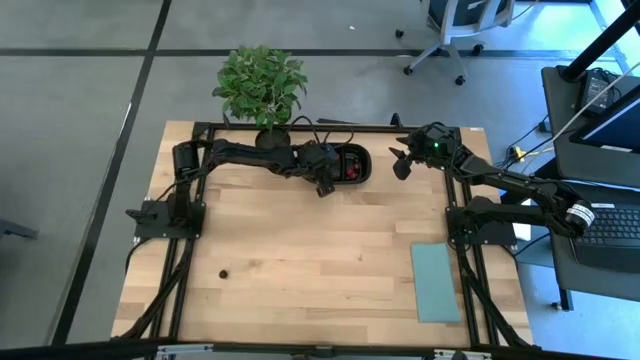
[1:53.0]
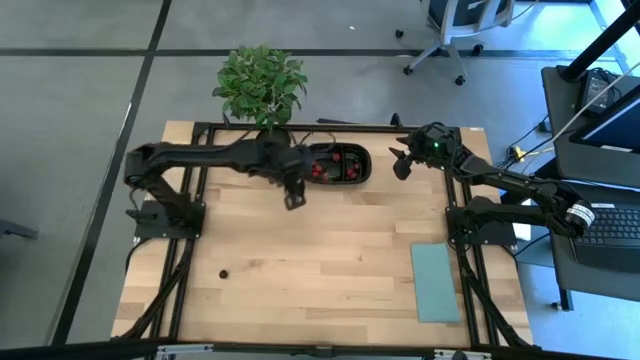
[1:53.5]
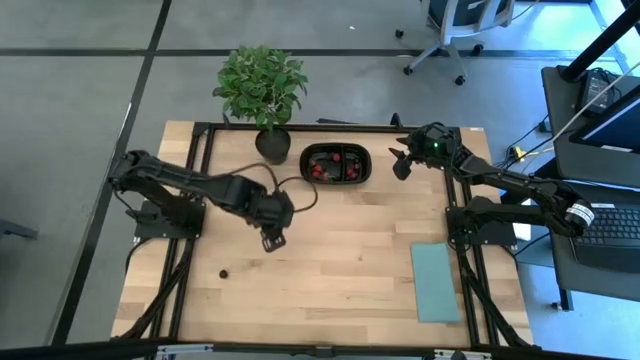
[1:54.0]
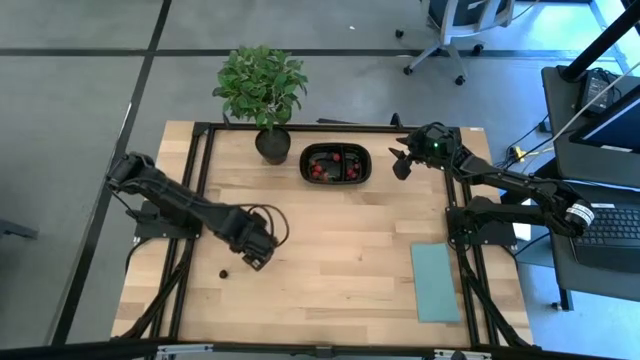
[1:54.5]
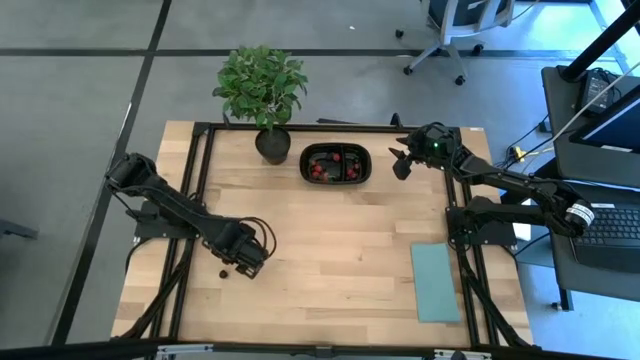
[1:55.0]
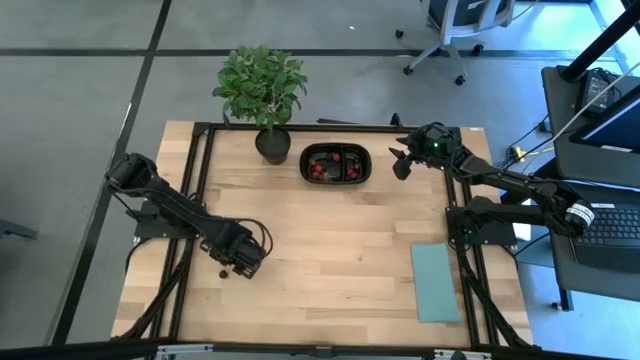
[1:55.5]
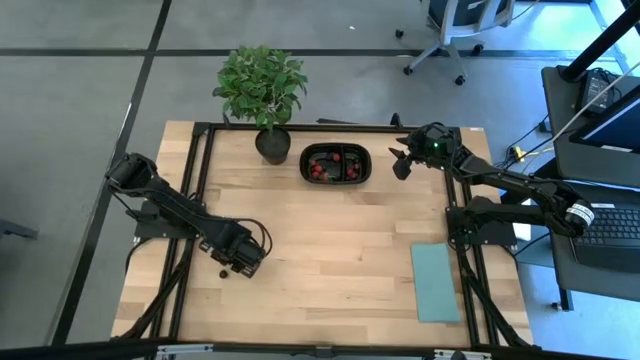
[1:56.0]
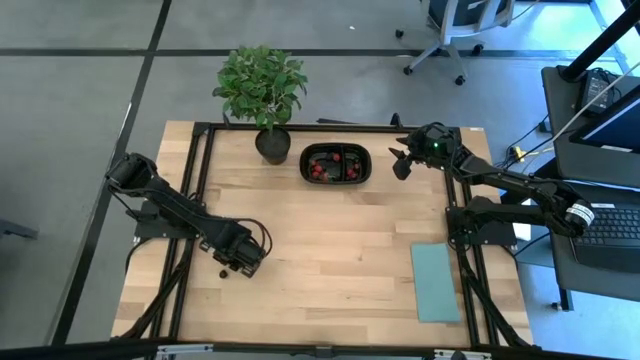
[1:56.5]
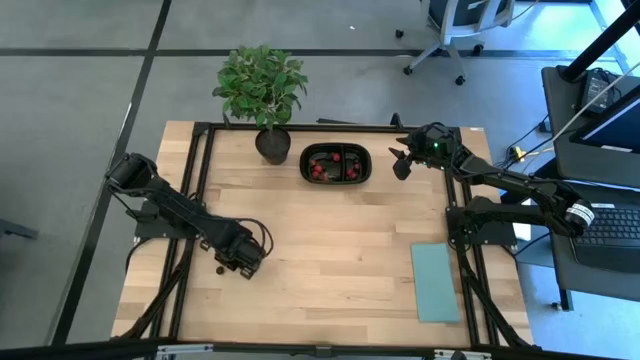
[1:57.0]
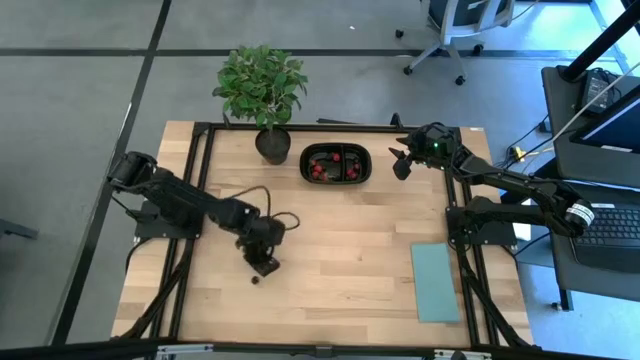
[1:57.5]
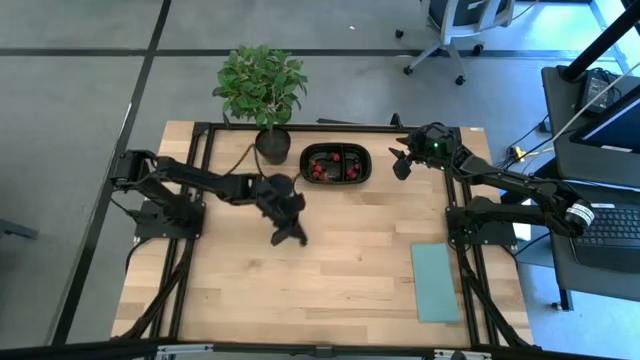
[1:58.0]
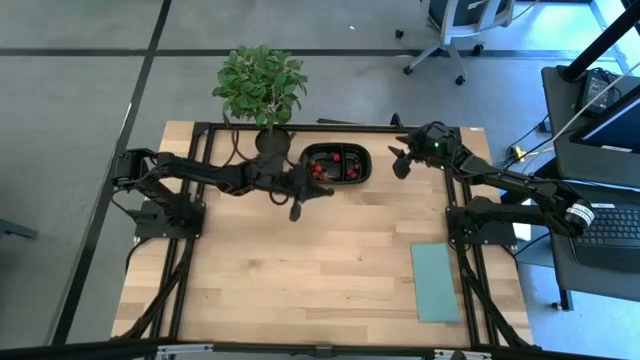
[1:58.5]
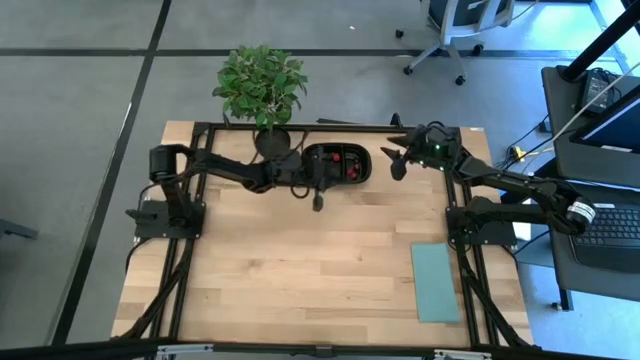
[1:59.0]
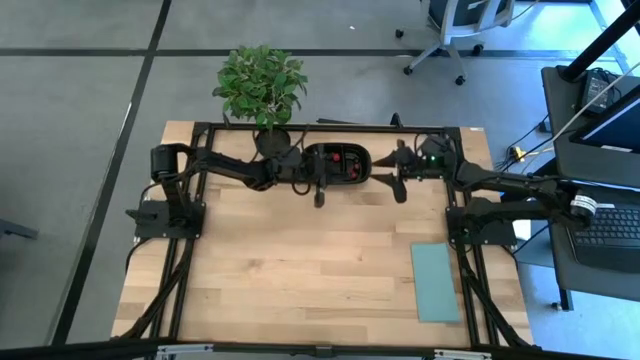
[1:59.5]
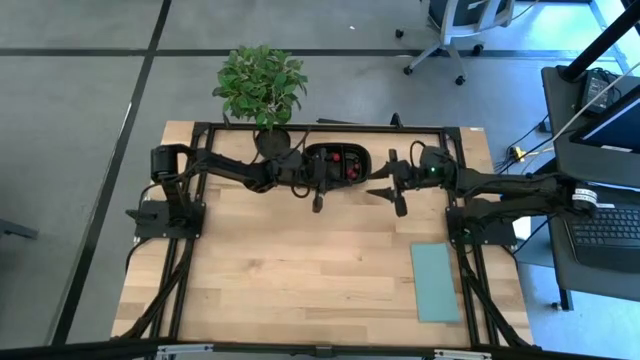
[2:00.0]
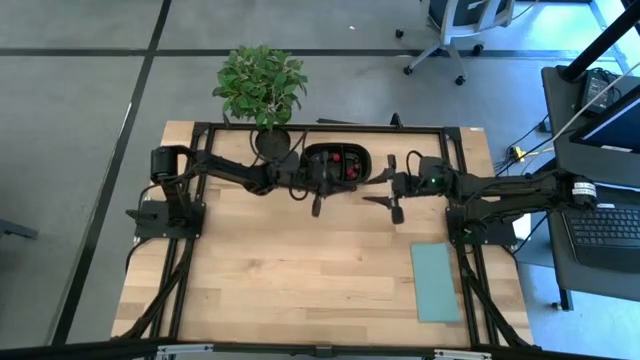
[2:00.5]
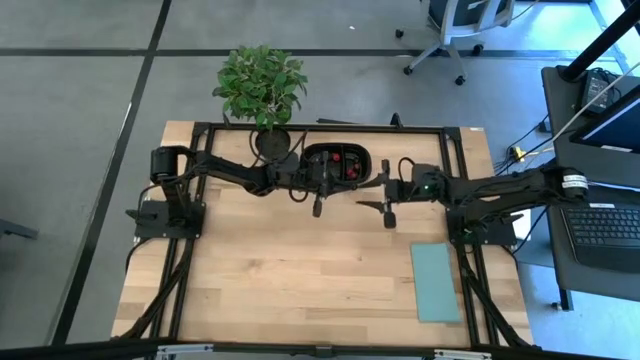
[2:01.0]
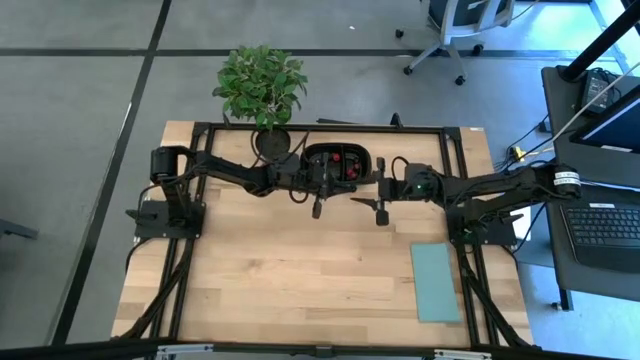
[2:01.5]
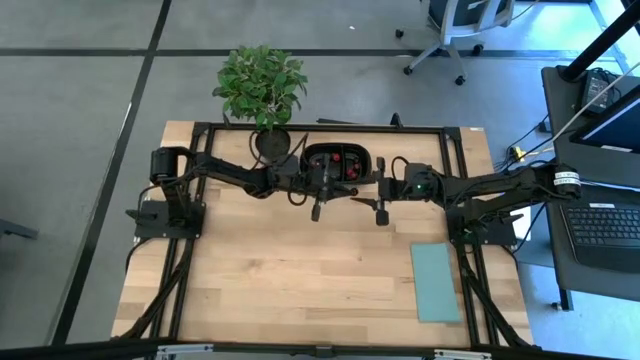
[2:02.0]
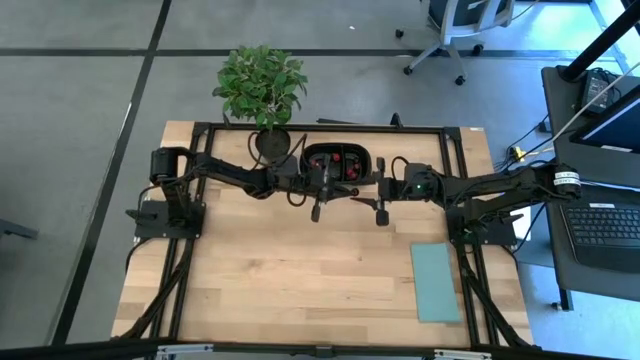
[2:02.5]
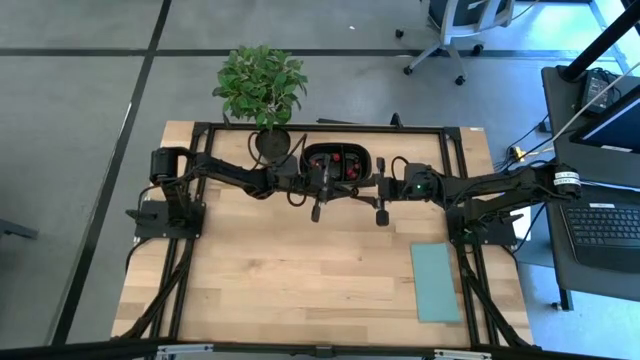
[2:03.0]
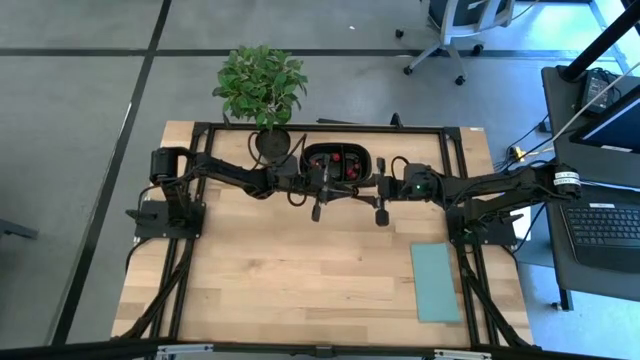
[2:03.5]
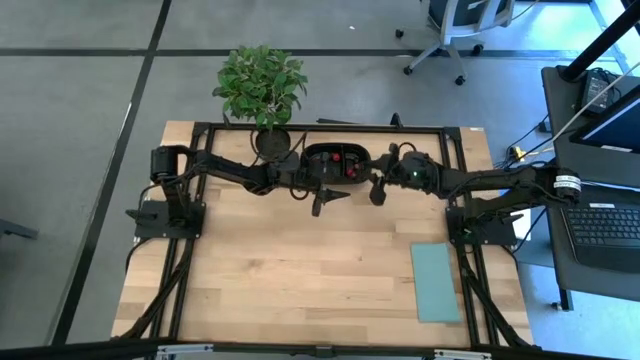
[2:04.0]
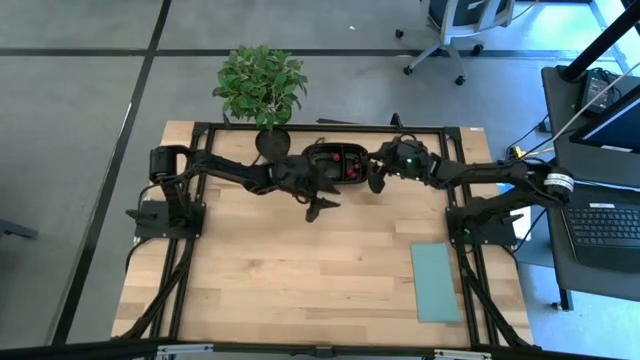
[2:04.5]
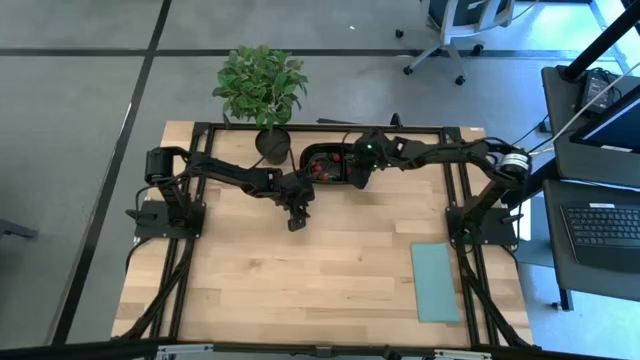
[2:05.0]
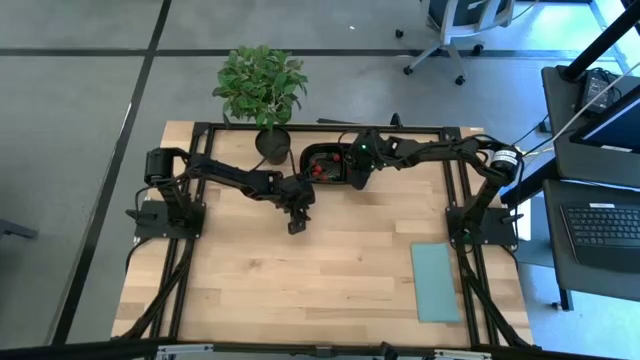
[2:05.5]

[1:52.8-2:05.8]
Task: Pick and placing Produce into tupperware
Put the black cherry into the black container

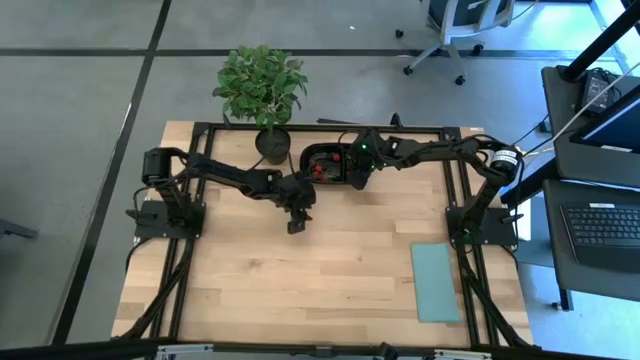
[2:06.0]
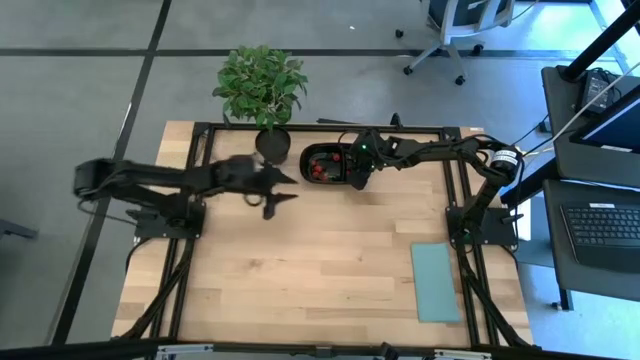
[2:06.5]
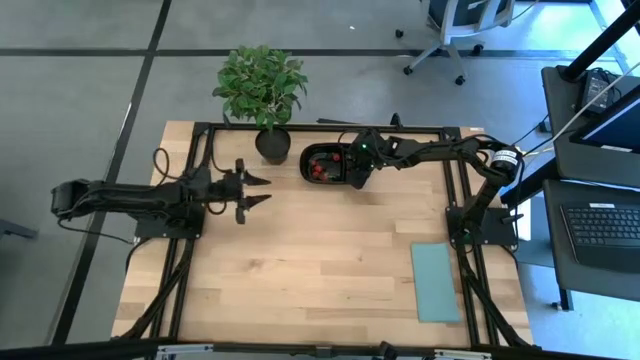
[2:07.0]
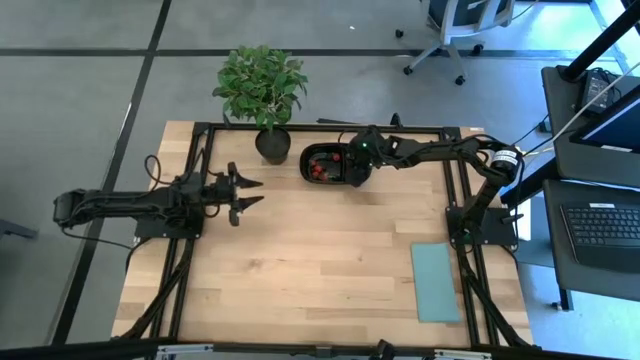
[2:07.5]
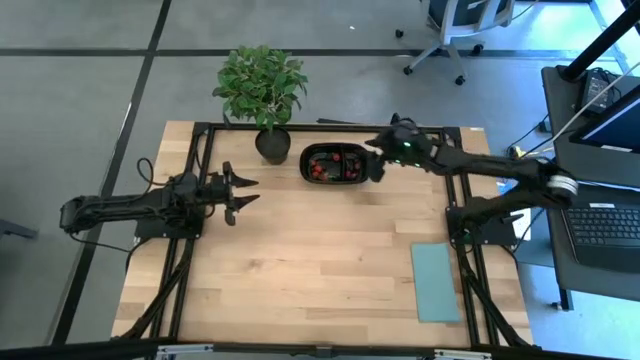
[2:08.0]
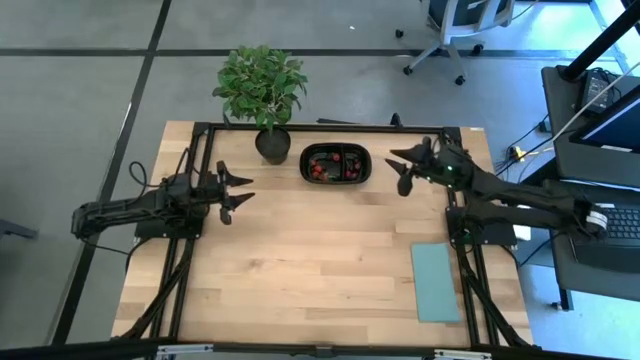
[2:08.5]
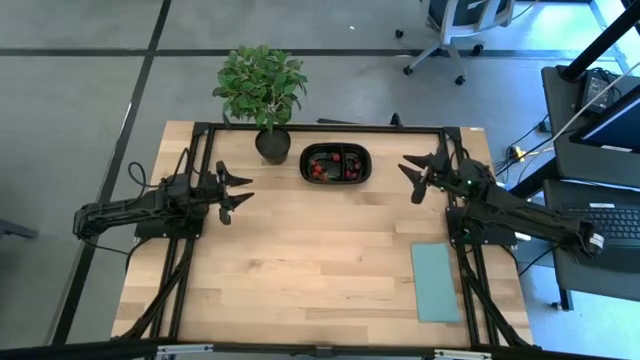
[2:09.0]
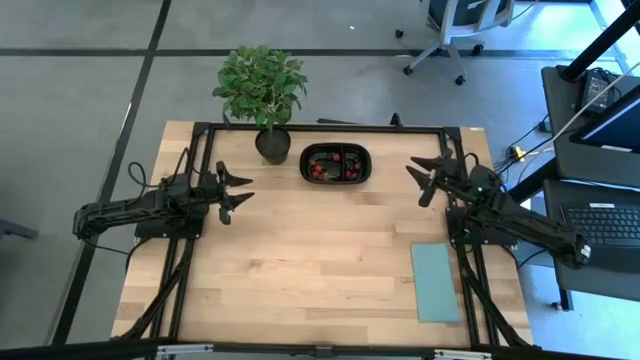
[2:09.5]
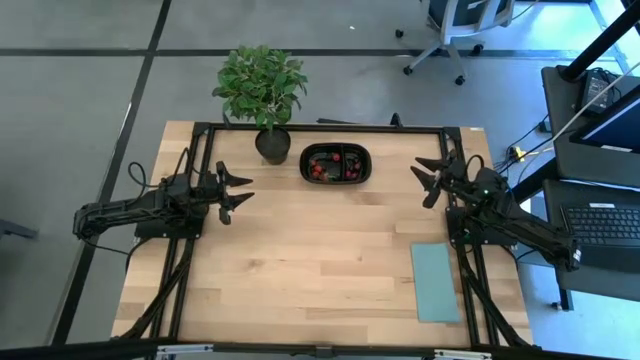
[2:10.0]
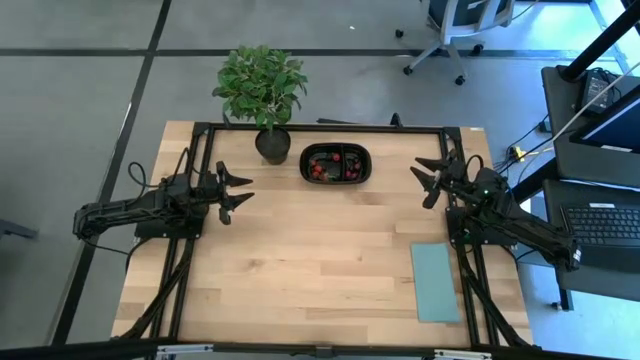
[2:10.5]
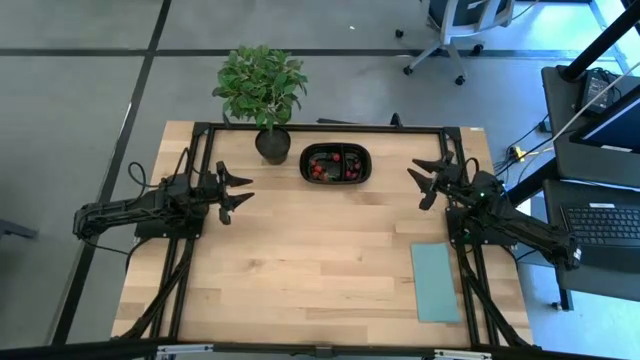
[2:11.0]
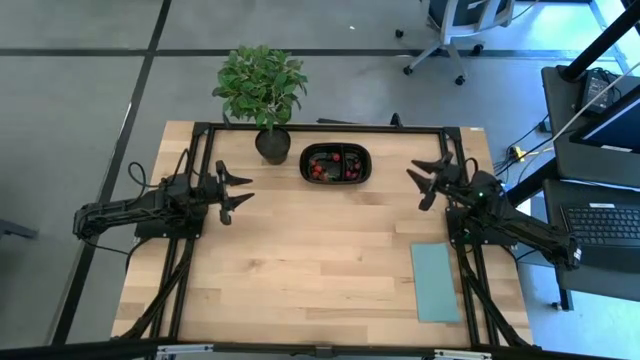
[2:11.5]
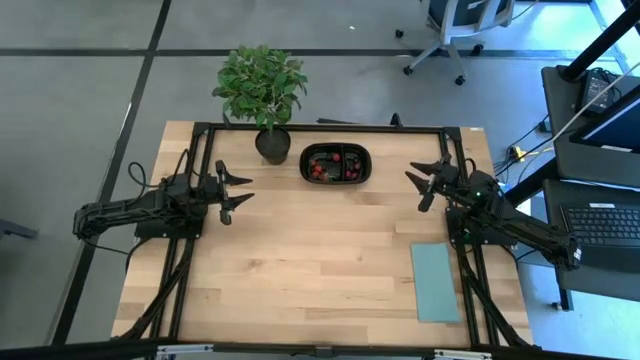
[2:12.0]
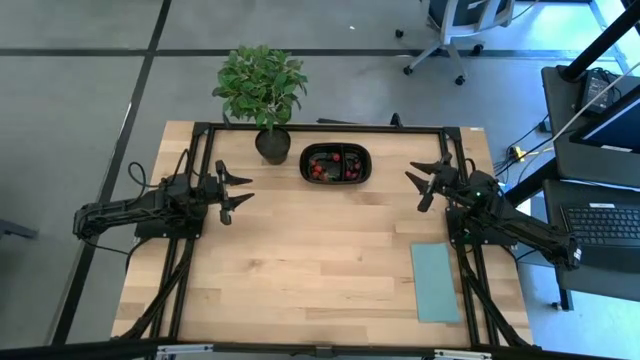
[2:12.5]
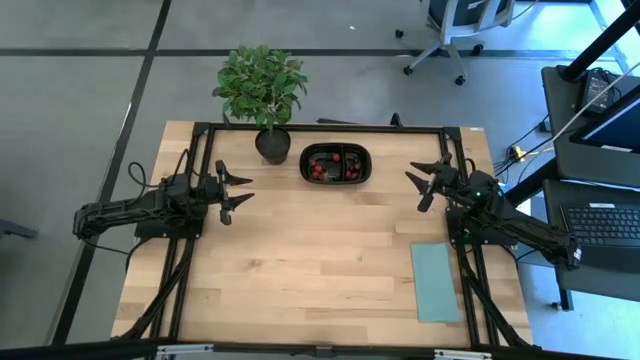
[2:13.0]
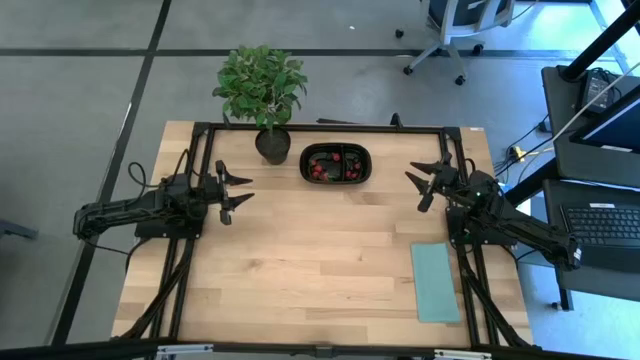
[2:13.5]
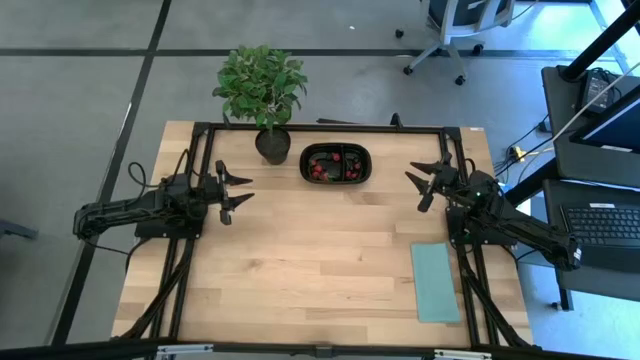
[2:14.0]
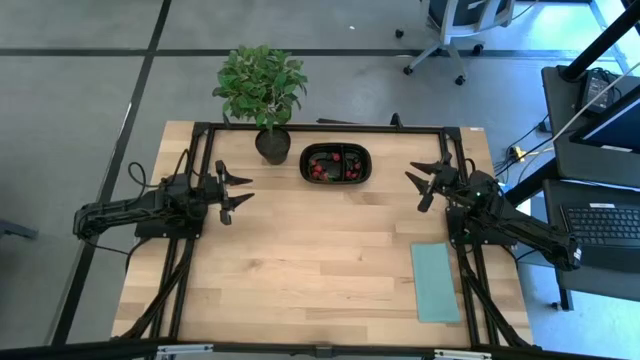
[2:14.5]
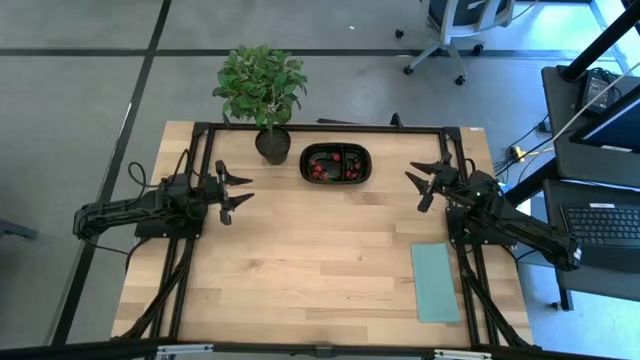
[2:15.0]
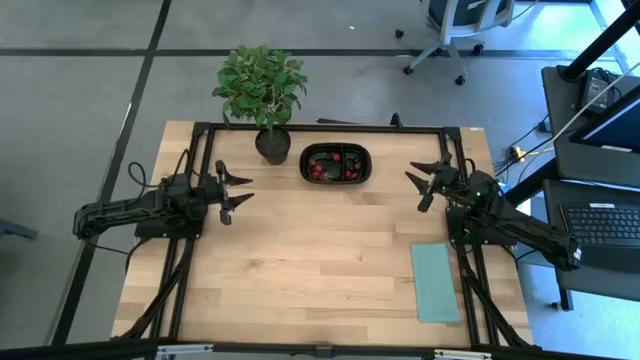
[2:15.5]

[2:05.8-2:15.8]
Return to Home Position
